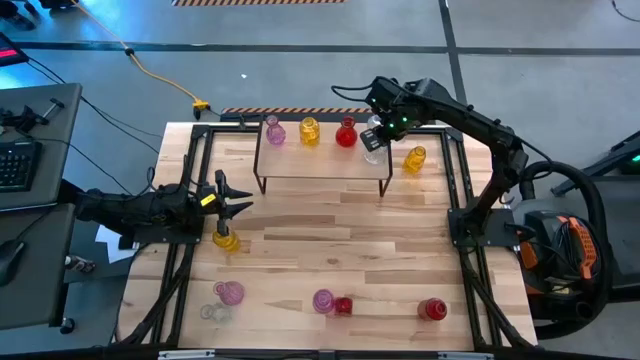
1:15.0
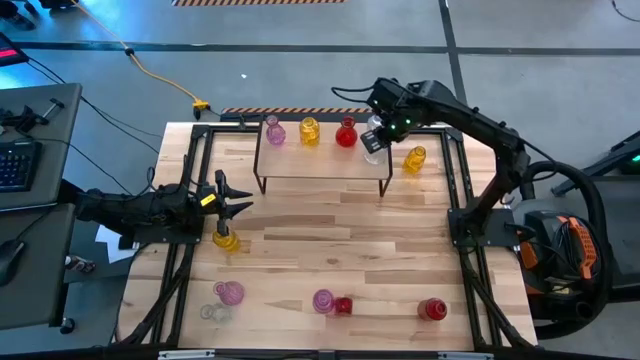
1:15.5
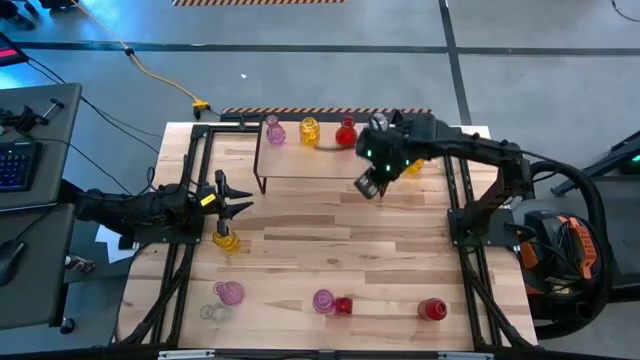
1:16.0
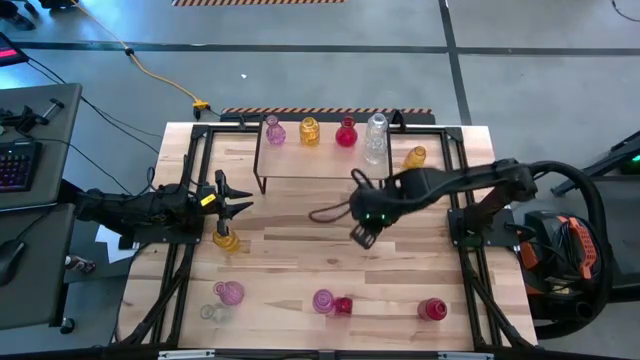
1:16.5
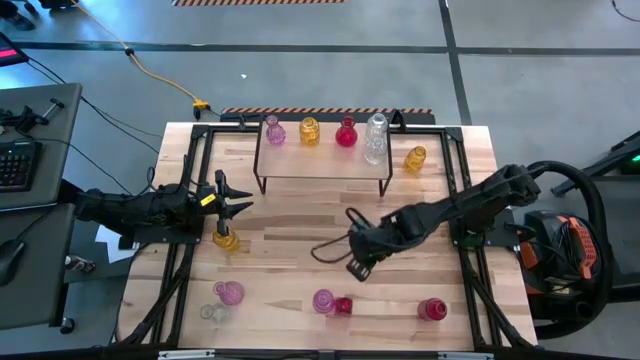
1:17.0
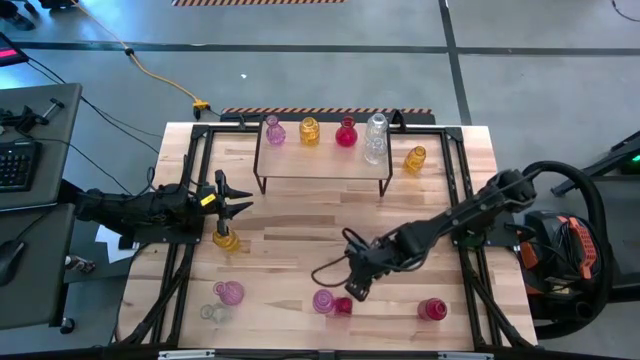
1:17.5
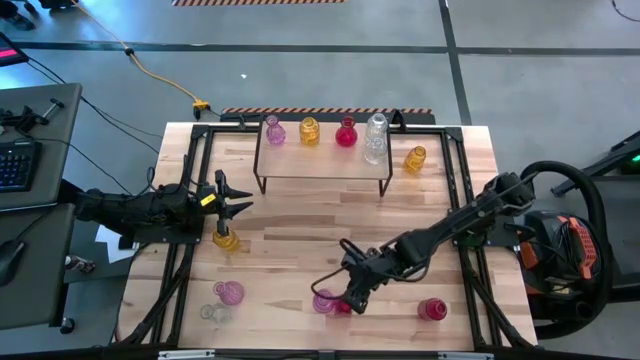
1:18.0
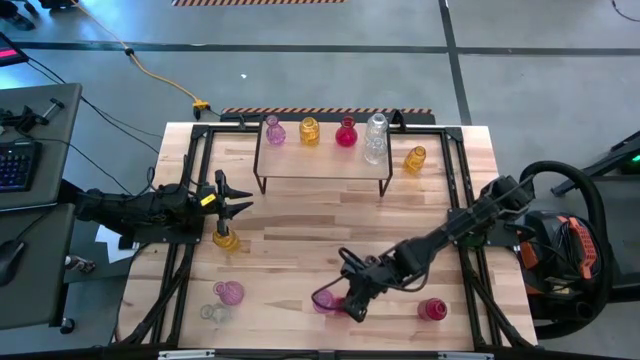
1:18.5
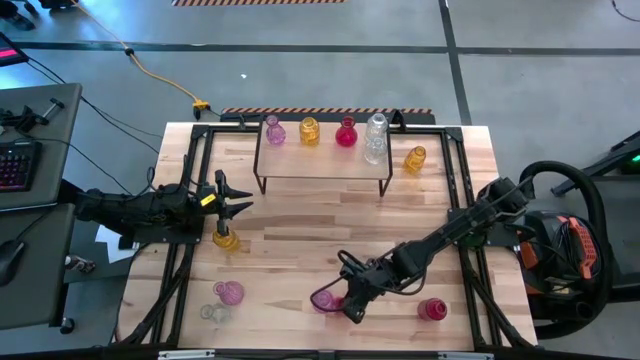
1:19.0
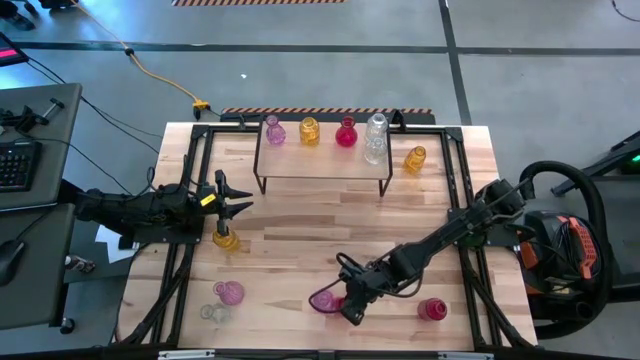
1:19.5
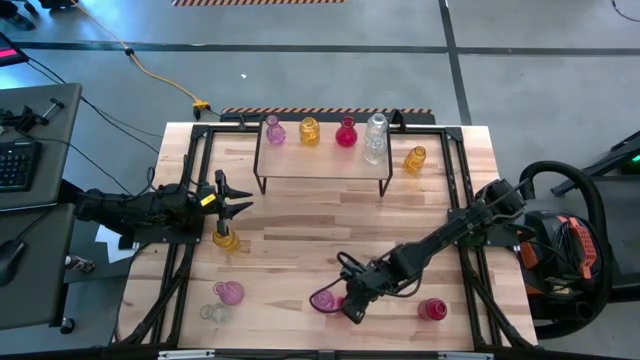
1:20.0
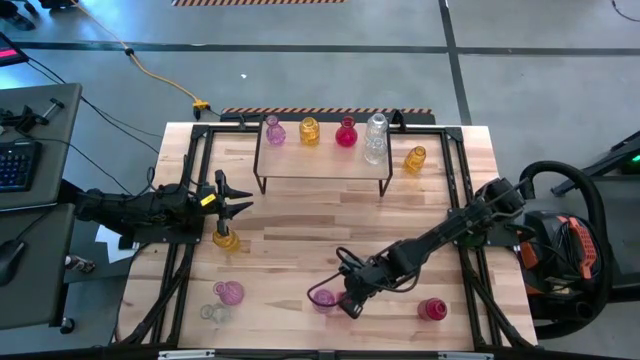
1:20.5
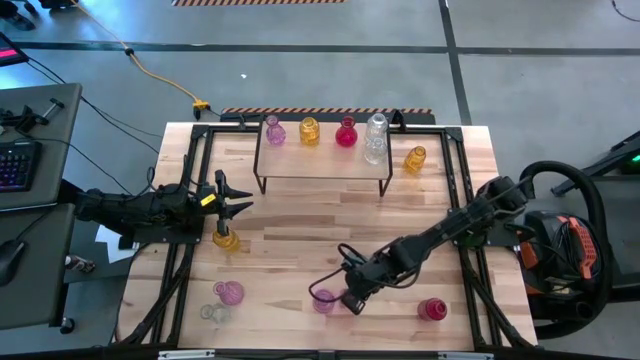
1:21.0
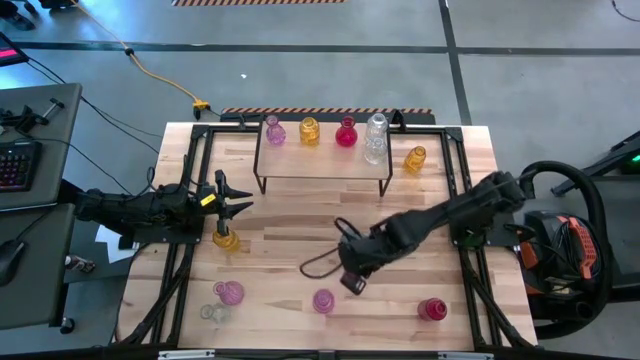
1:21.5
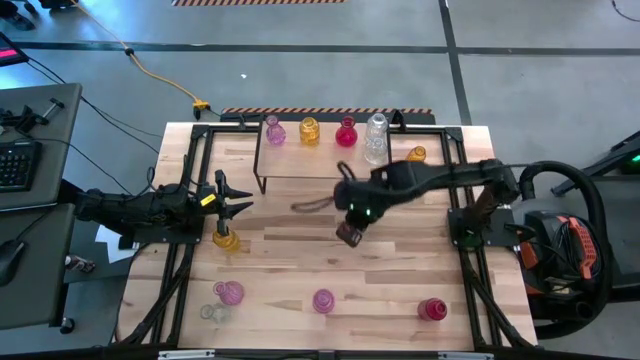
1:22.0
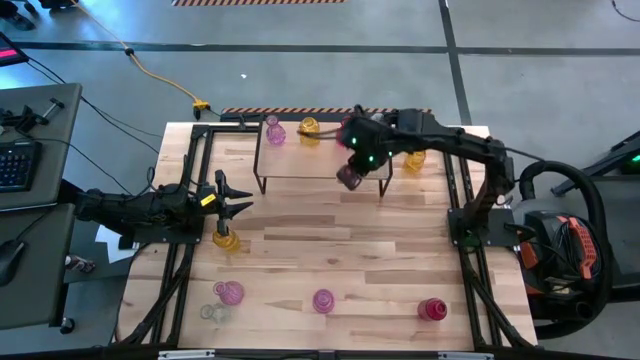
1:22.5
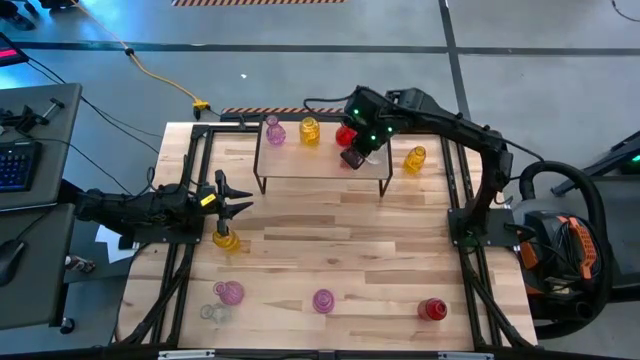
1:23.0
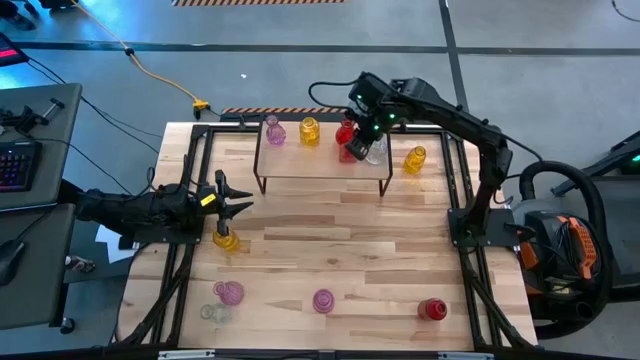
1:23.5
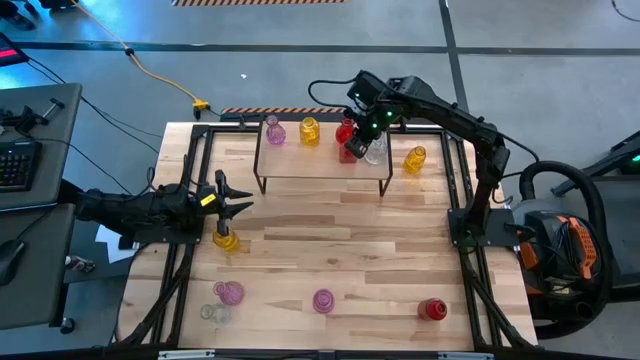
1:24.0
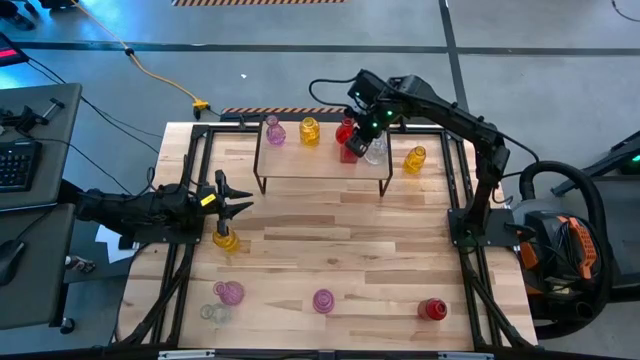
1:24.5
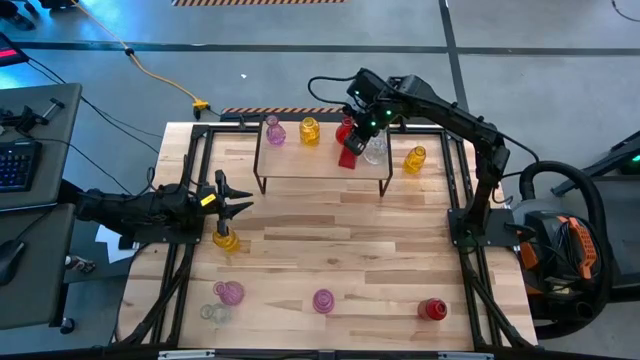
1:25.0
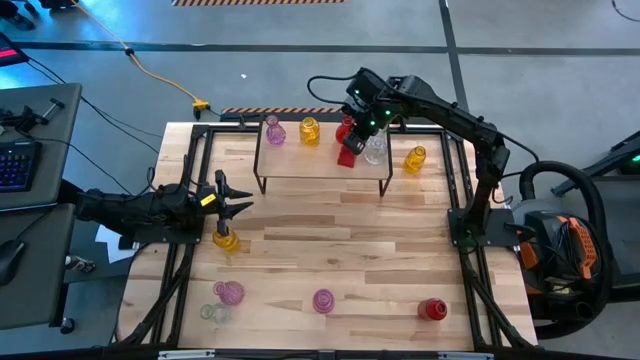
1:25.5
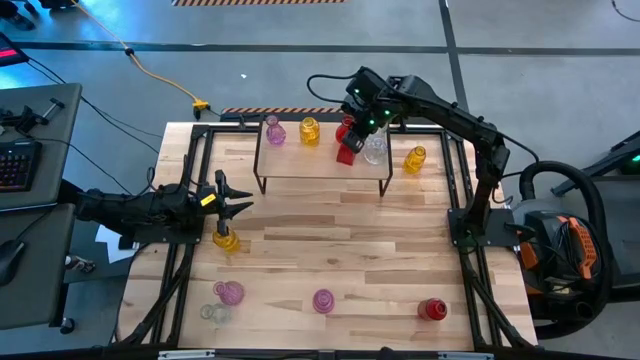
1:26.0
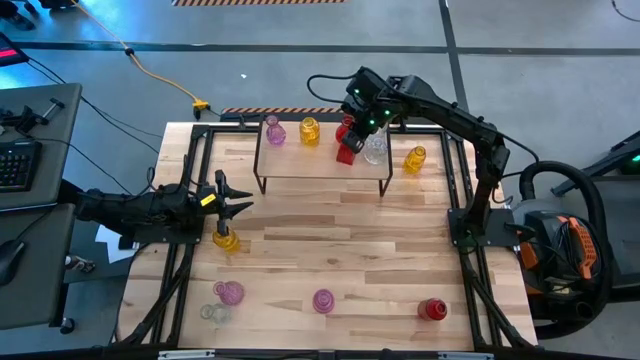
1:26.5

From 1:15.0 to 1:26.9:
Task: sort vases onto shelf
Put the left red vase on the shelf aligned with the other red vase

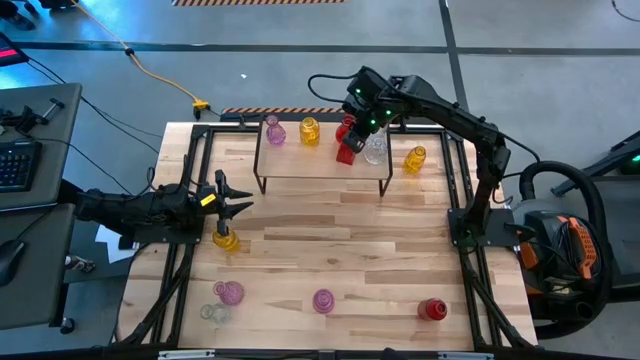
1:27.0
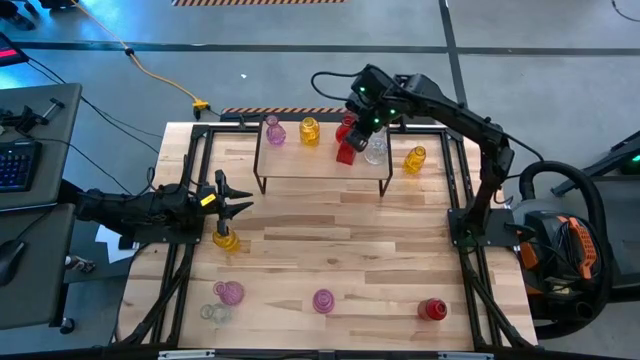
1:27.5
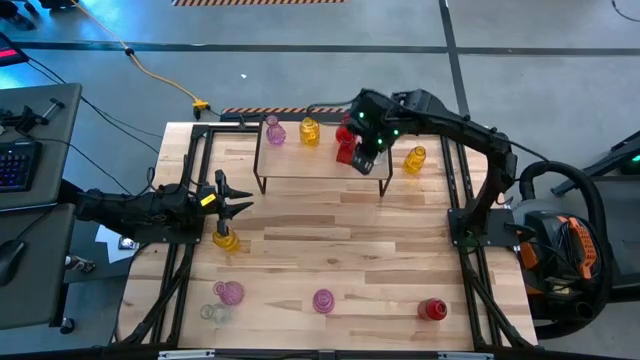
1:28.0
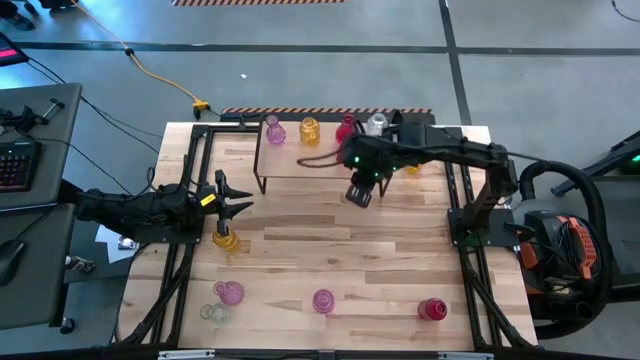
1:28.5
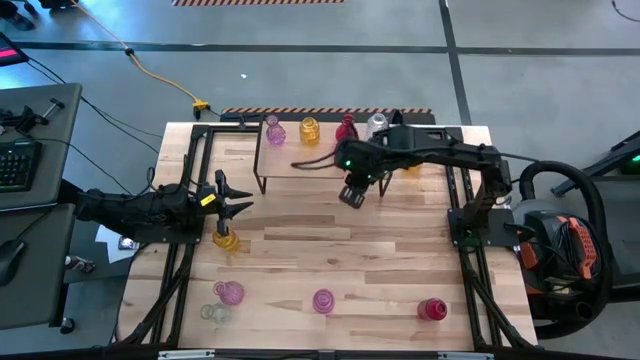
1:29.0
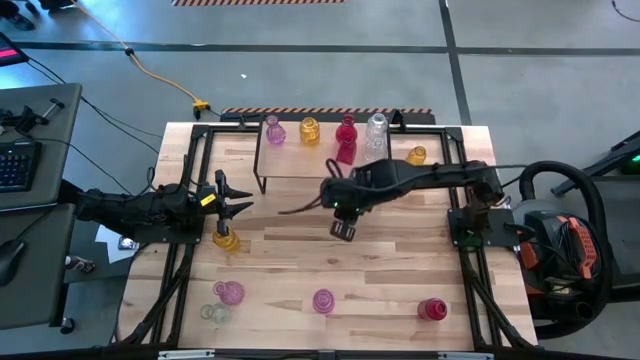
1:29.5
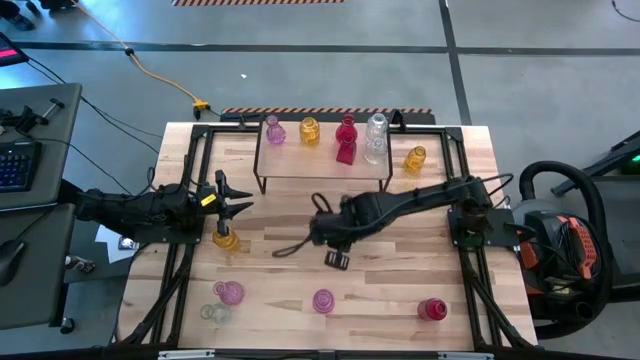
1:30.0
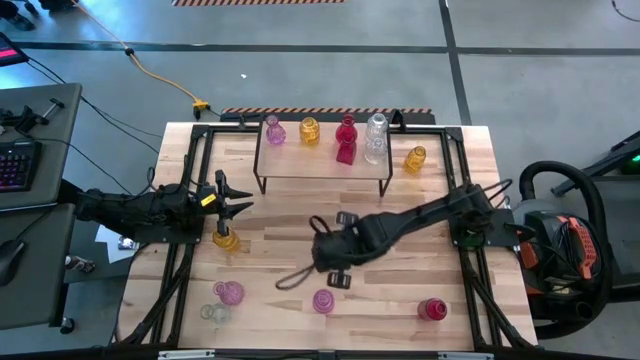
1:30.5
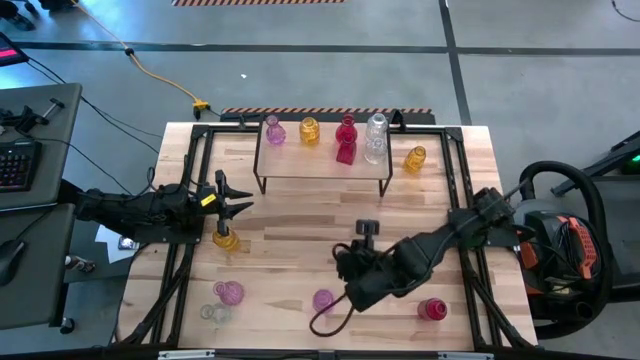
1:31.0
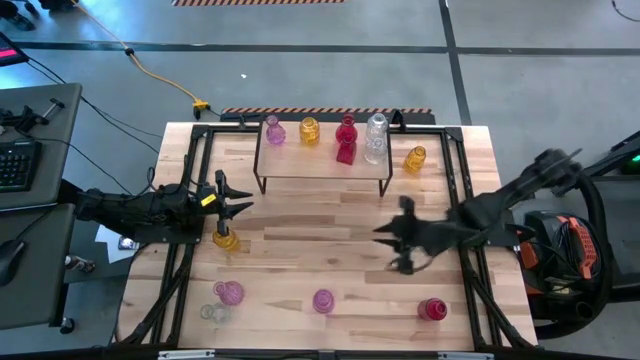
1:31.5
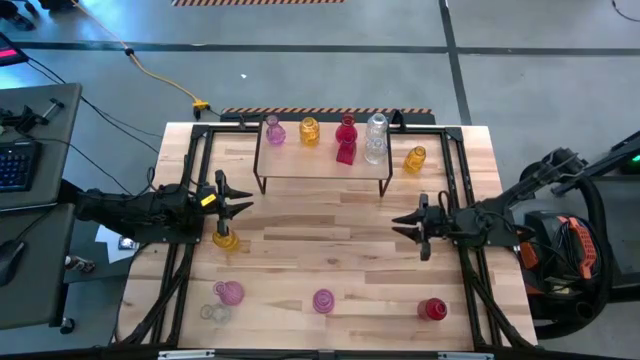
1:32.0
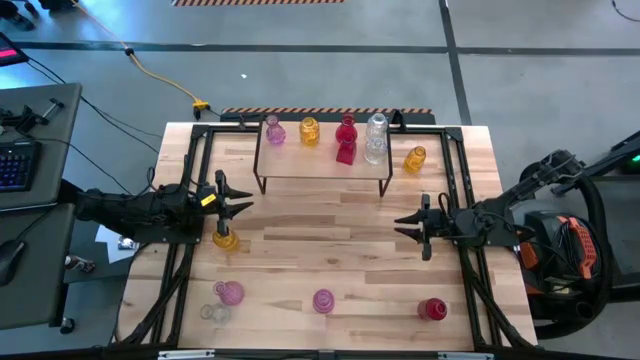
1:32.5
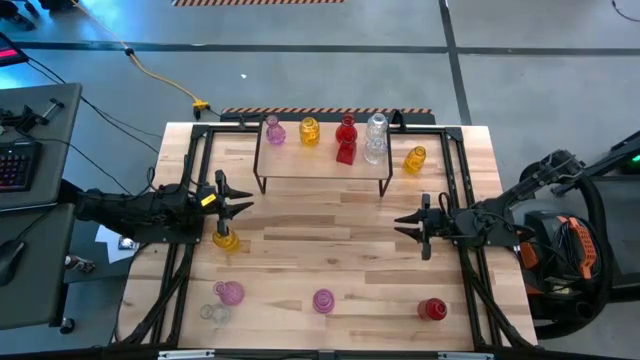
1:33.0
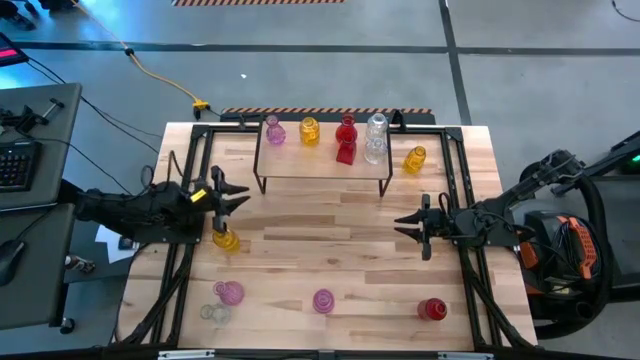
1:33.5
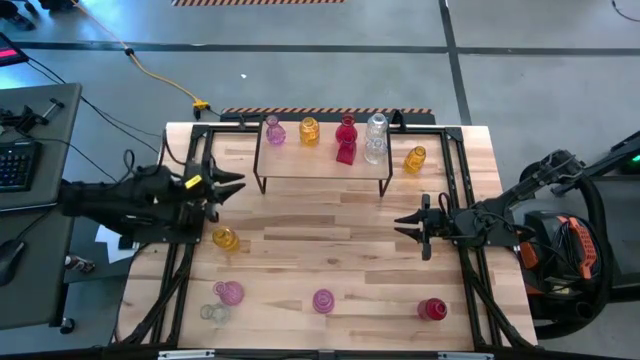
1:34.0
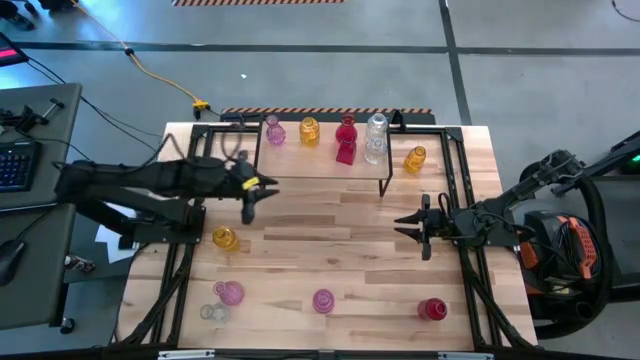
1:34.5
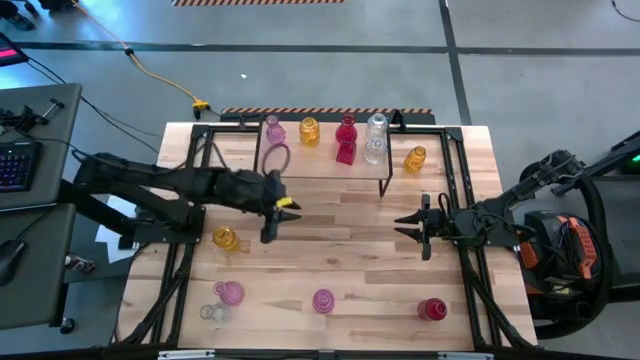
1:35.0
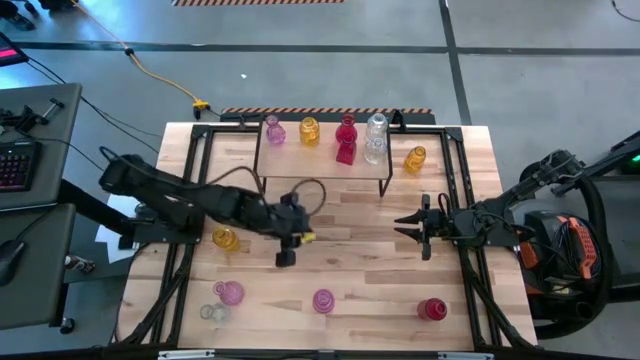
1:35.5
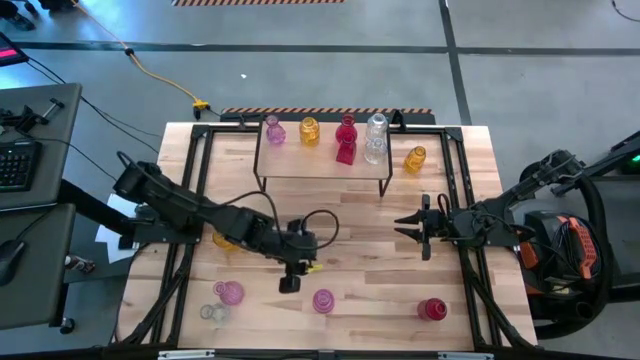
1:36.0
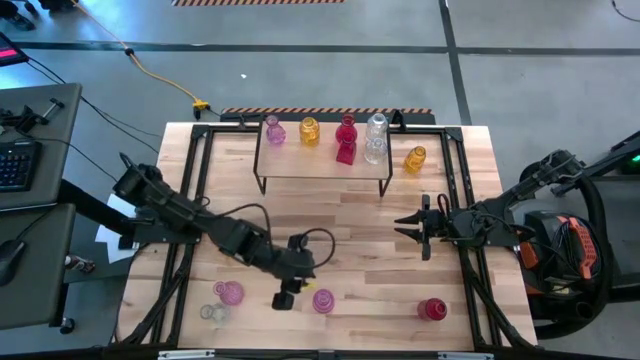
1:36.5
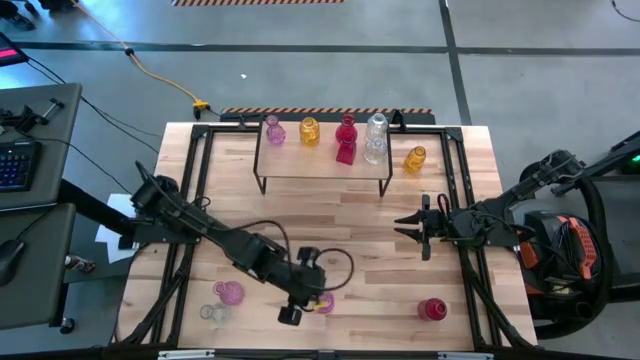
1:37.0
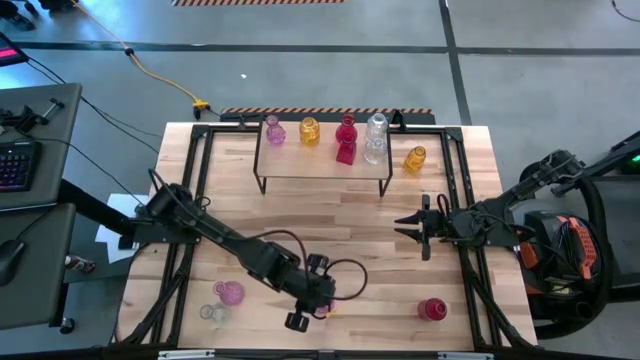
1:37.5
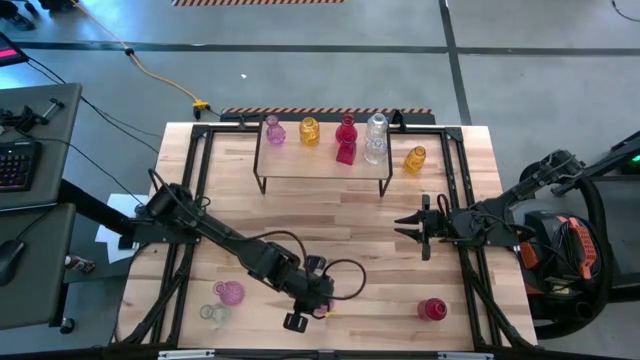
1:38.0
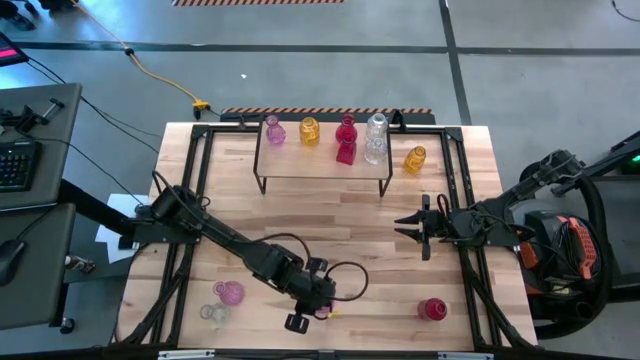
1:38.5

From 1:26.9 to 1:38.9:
Put the right purple vase on the shelf aligned with the other purple vase
